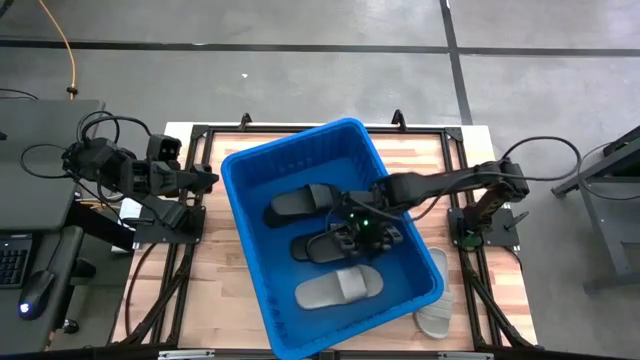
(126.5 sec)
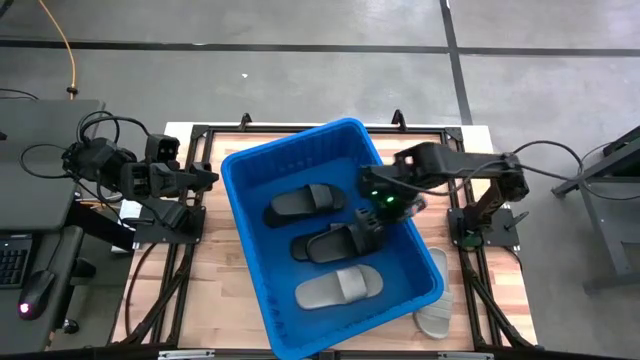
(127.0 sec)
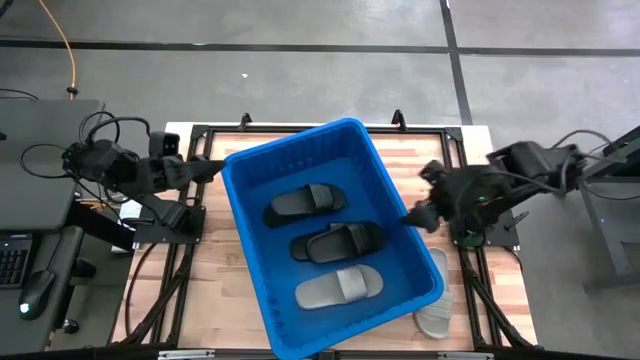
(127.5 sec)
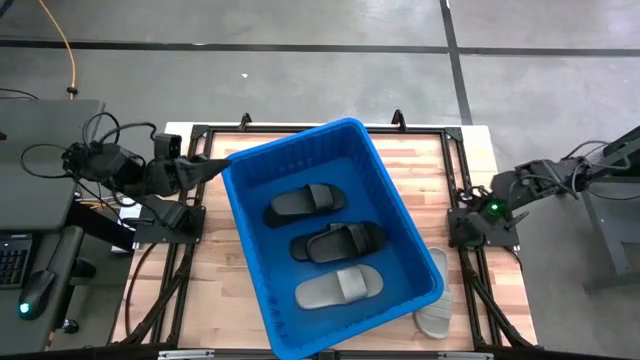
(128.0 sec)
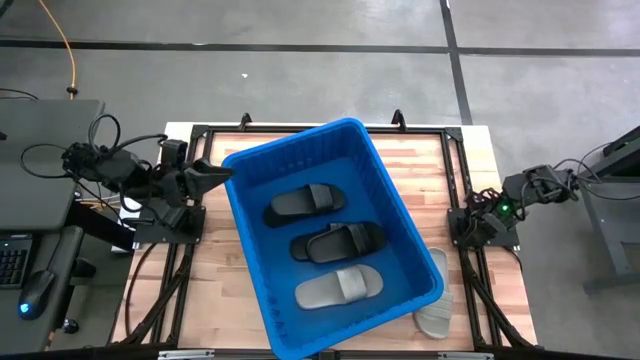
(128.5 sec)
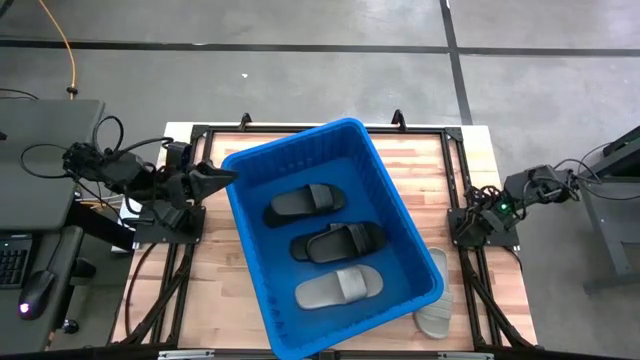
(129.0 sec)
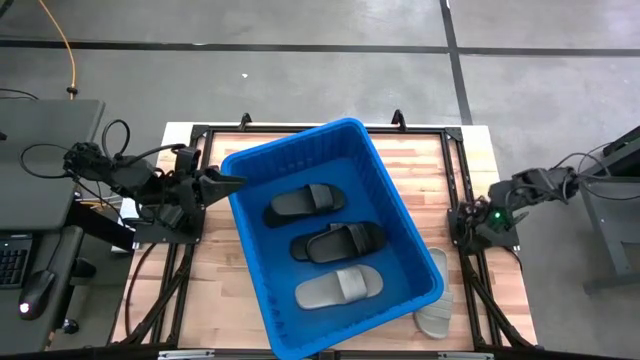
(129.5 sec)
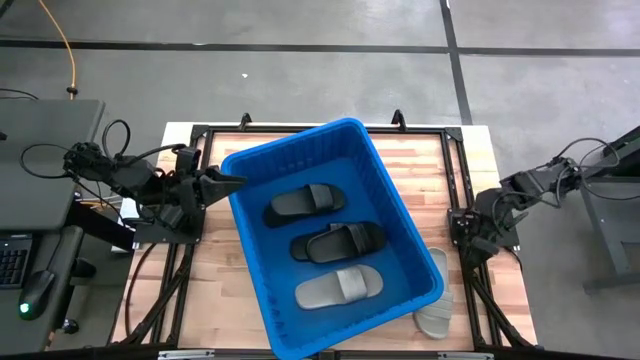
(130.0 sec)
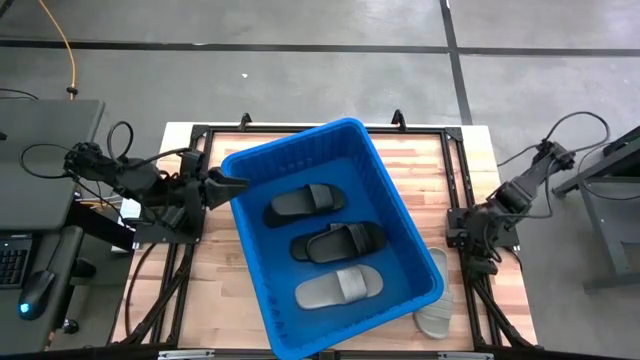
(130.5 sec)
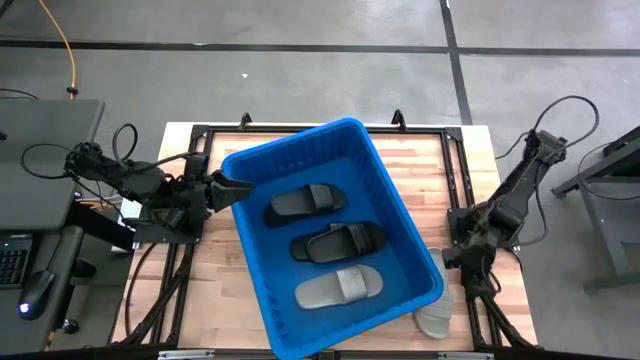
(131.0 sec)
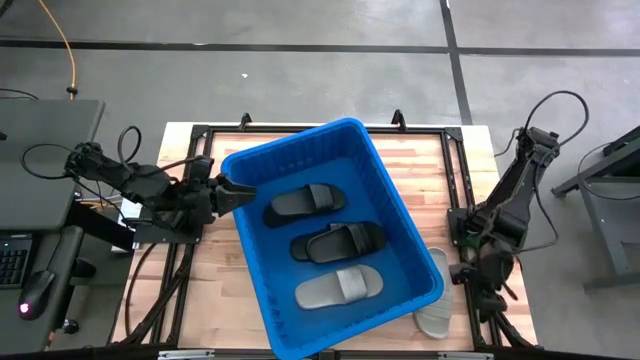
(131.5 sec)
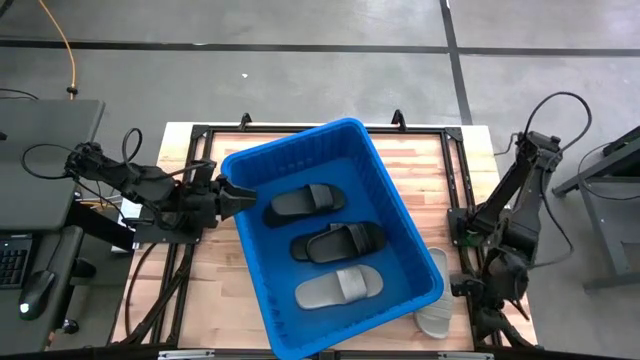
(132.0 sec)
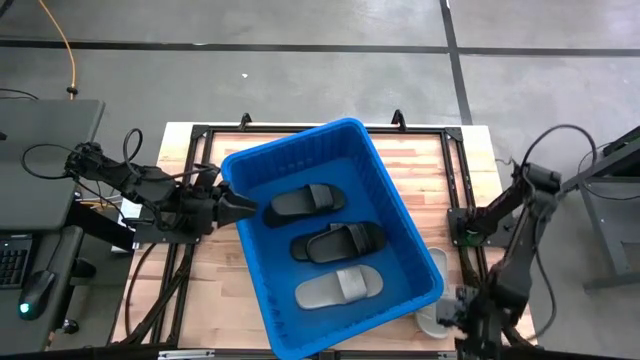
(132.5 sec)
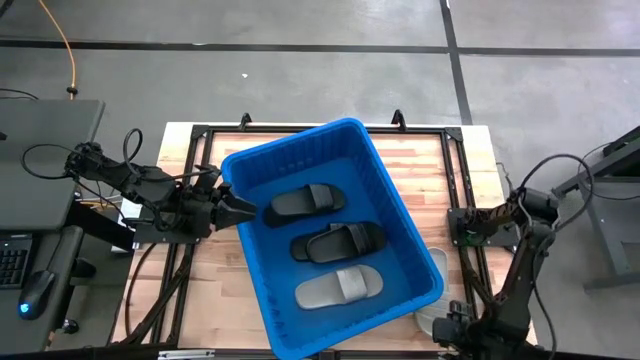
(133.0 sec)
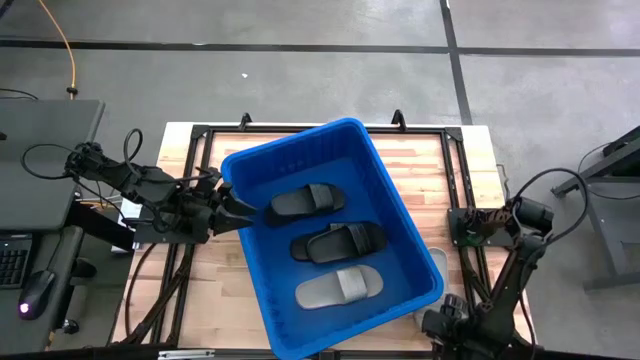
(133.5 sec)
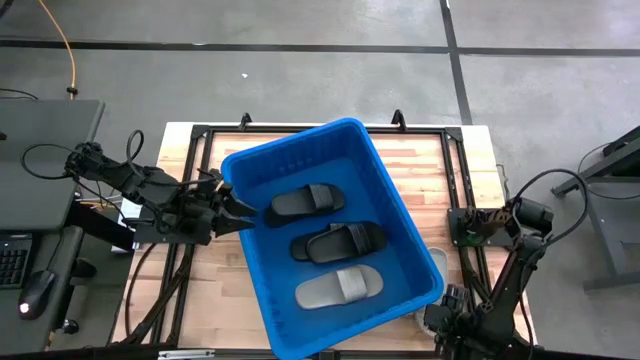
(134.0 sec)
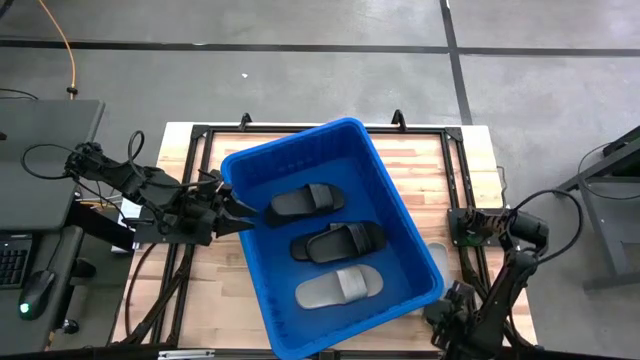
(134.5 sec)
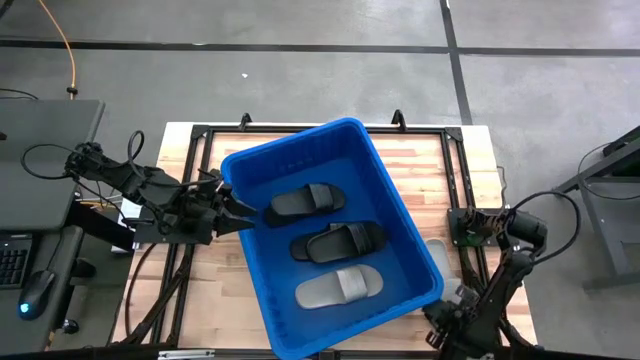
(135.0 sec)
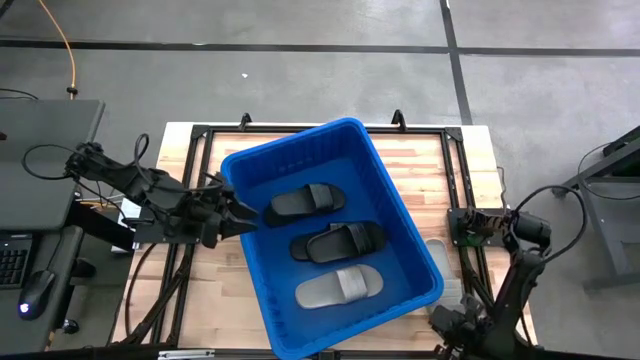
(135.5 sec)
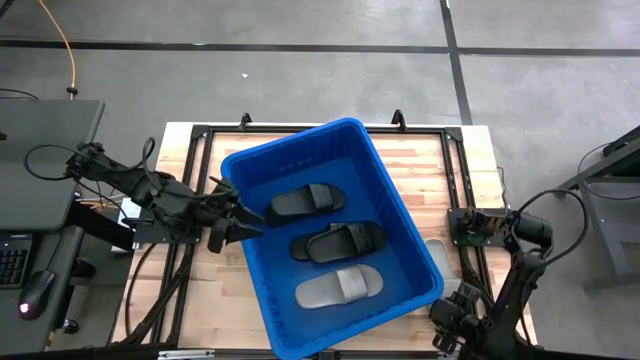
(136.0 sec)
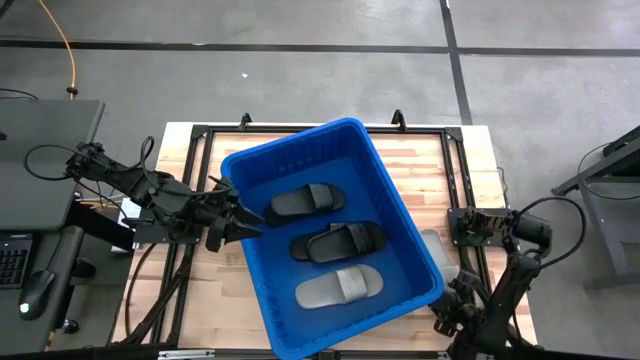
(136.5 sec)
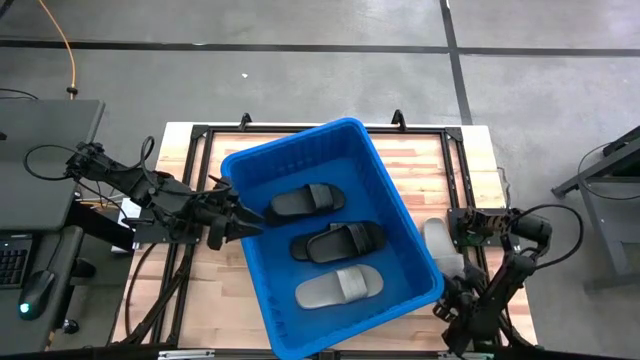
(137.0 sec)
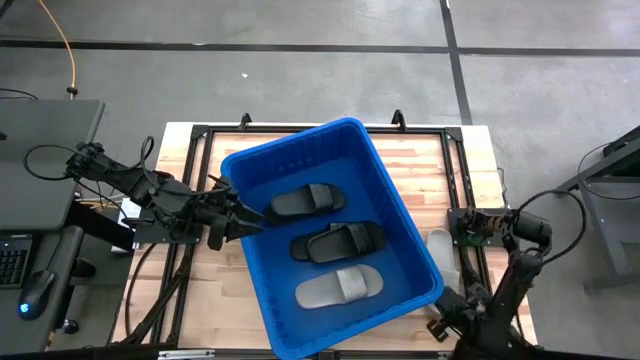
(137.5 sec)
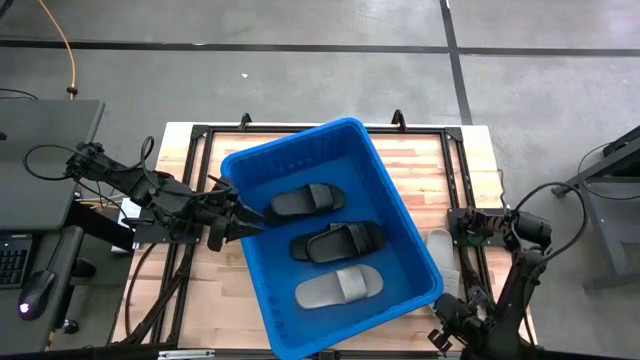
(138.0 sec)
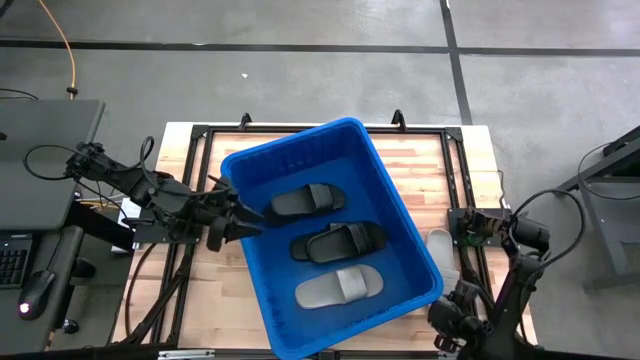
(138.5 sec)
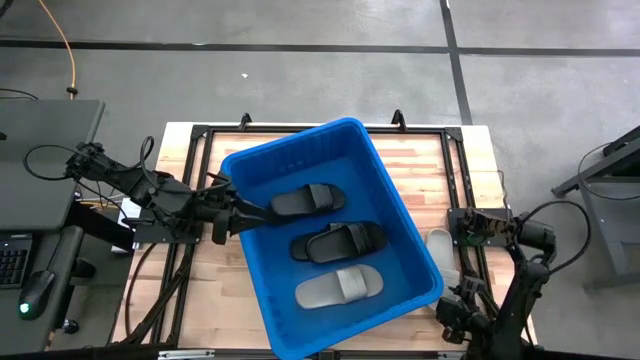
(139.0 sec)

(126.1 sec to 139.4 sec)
Task: Pick and place slides into bin
Put the white slide in the bin

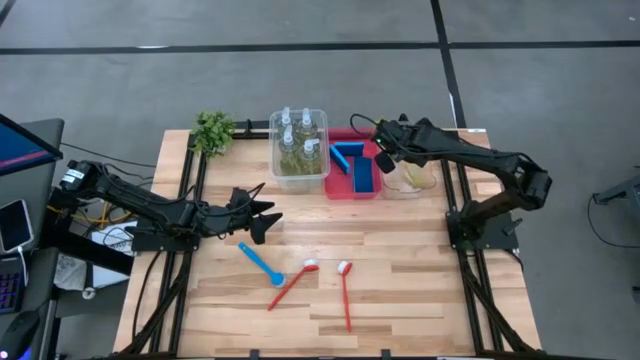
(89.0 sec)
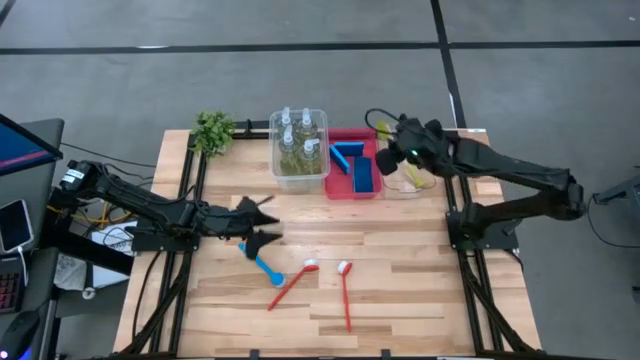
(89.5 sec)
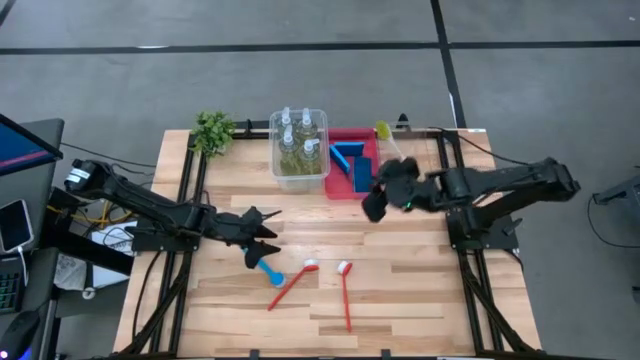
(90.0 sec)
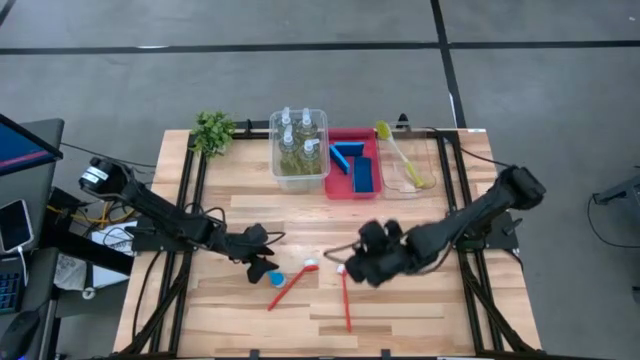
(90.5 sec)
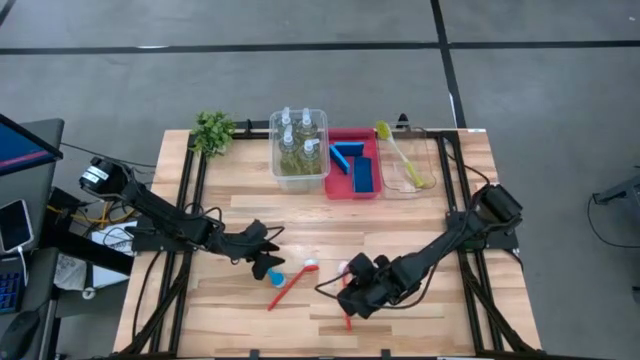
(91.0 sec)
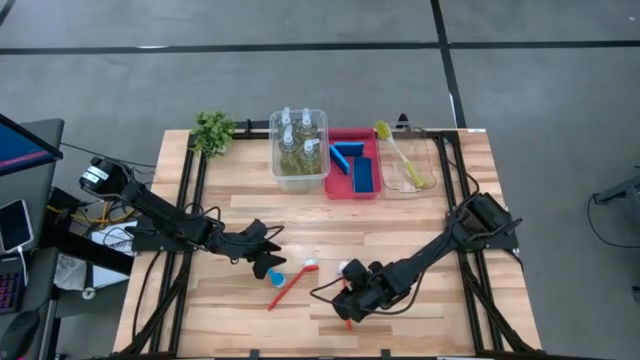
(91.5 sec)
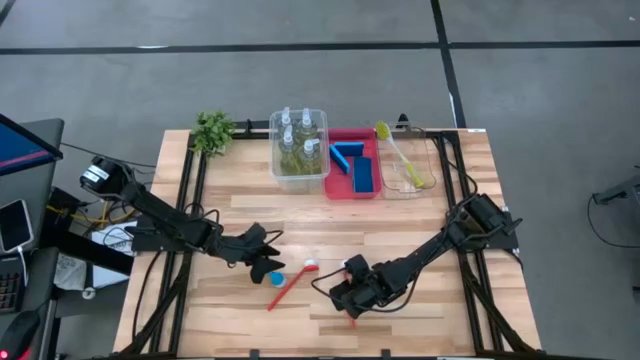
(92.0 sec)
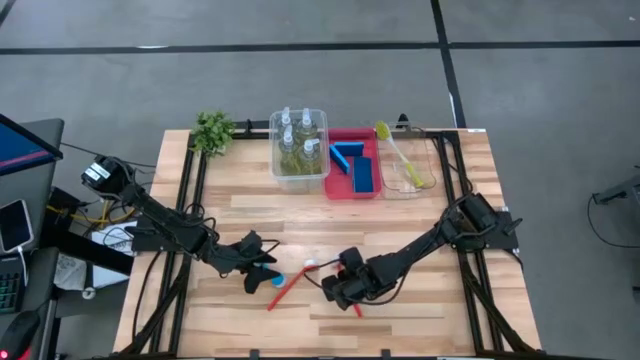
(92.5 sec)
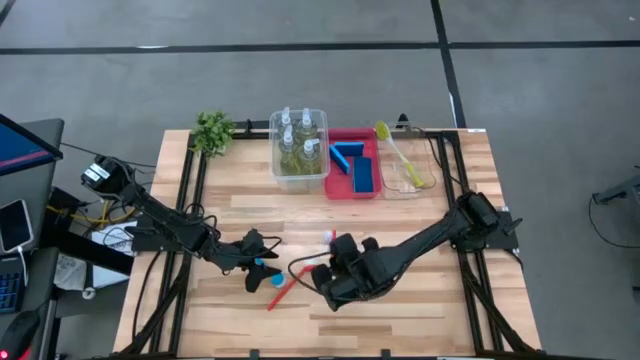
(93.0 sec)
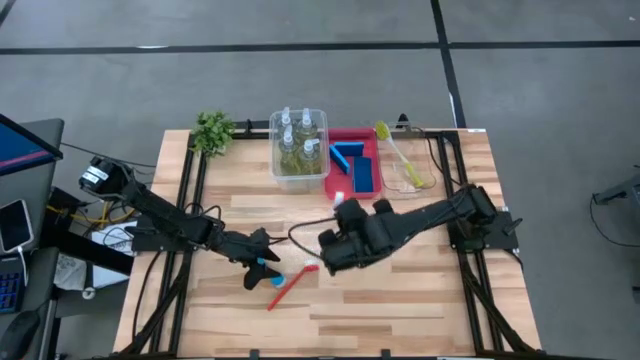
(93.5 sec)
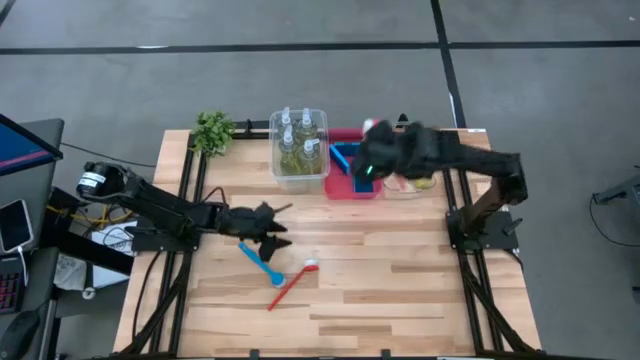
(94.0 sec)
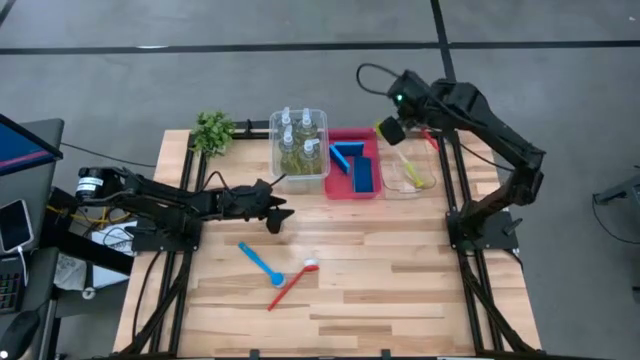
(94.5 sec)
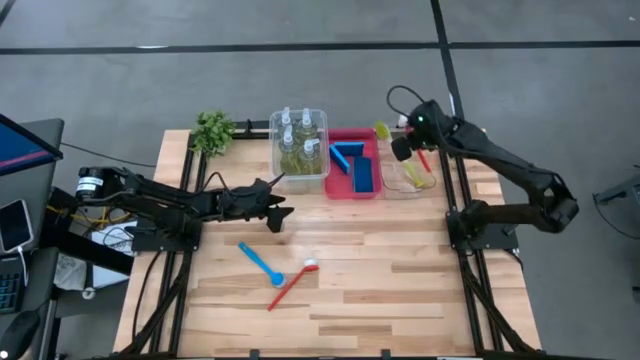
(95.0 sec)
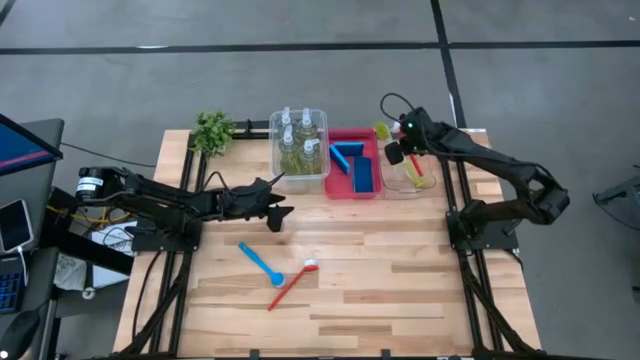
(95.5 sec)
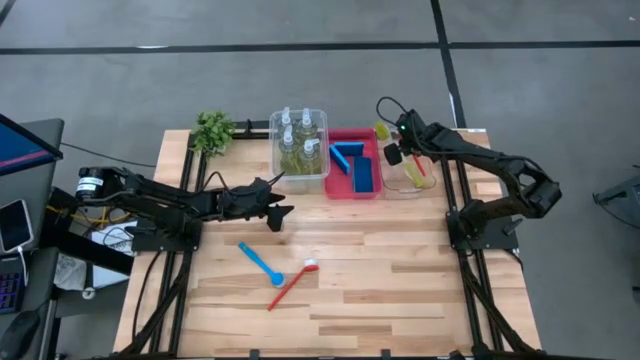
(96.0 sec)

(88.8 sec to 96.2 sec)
Task: Pick & Place Kitchen Sink Supplies
Put the red dish brush into the transparent bin
